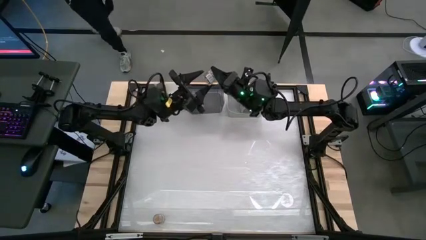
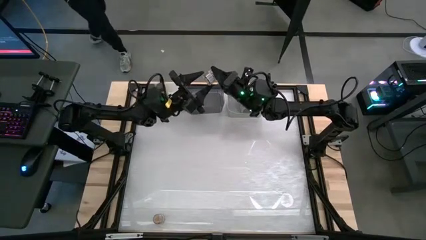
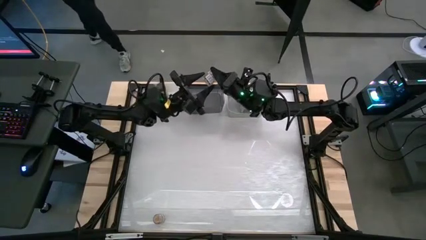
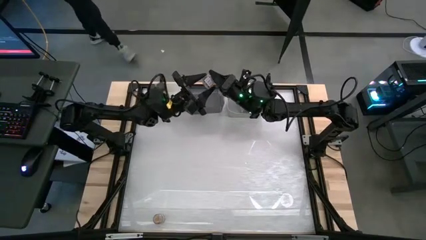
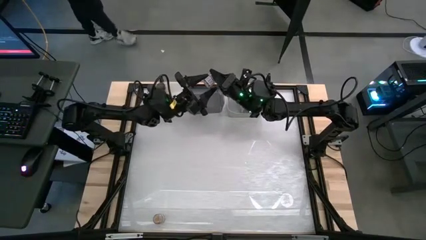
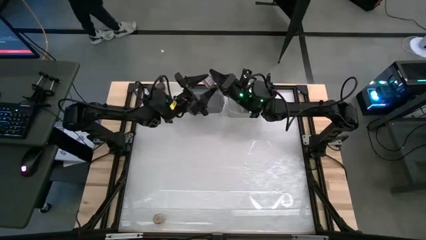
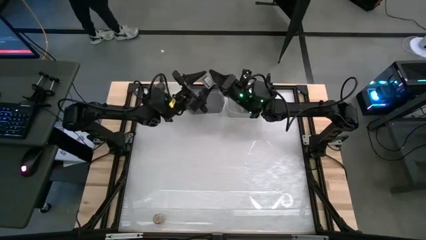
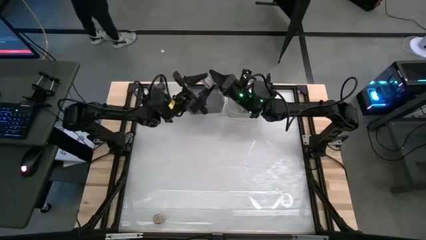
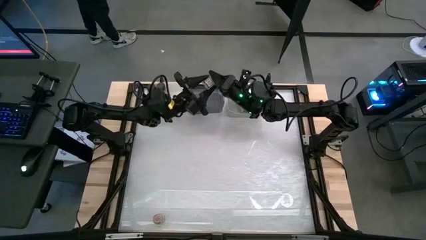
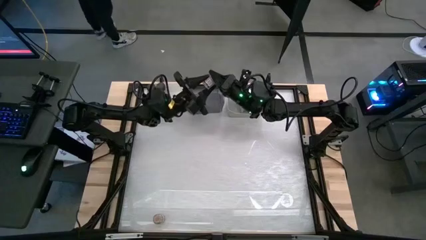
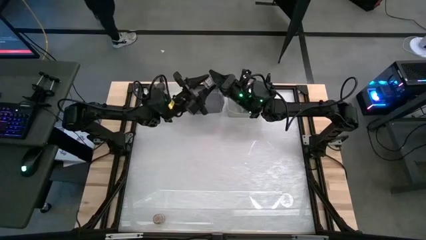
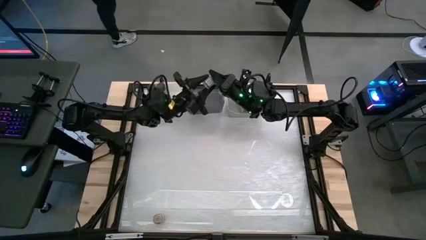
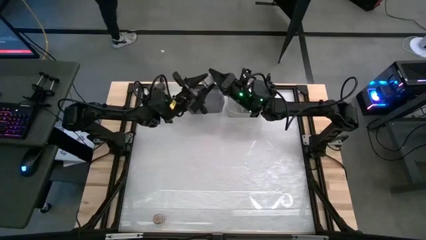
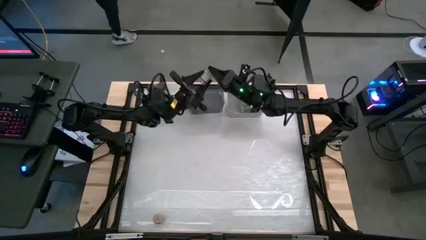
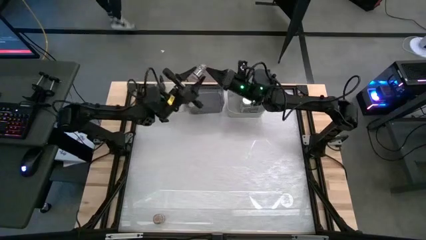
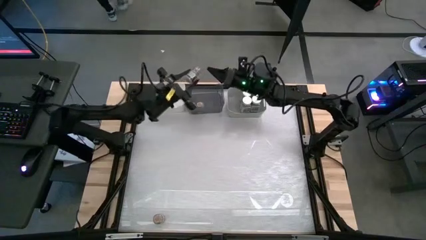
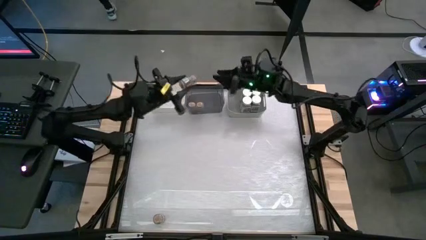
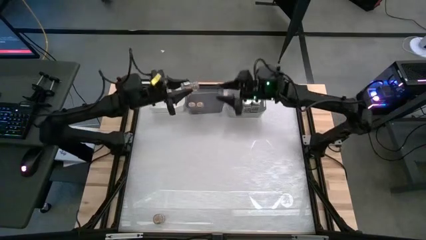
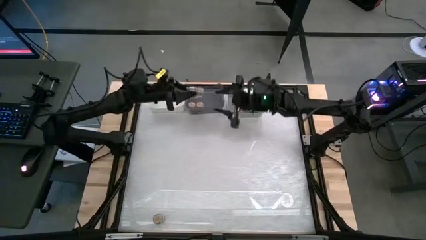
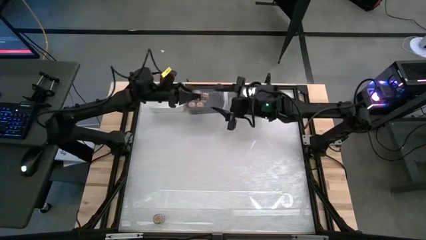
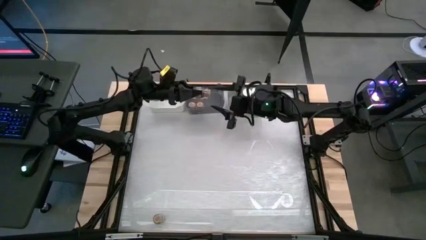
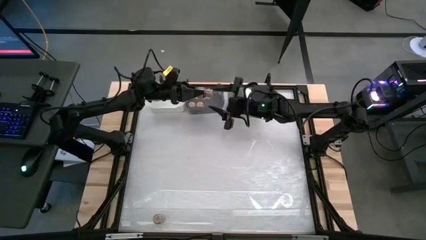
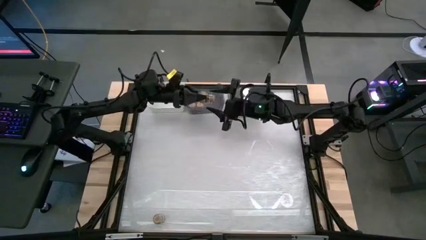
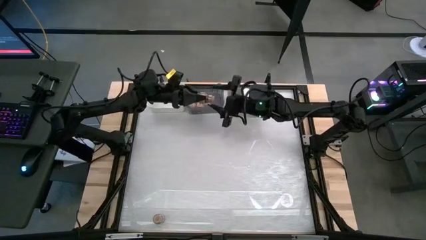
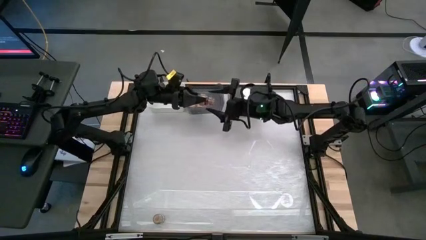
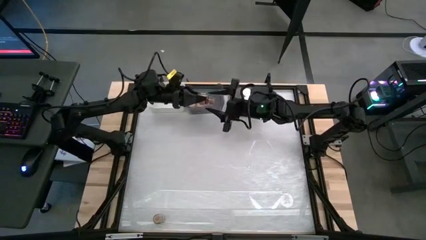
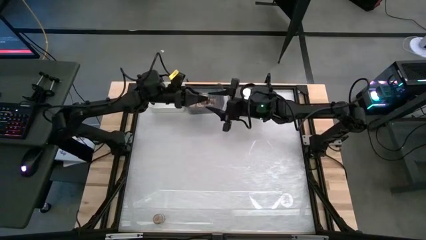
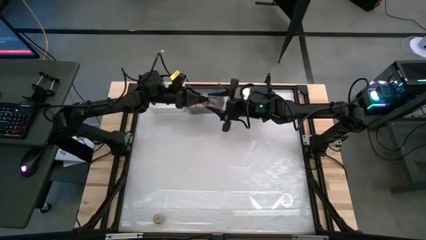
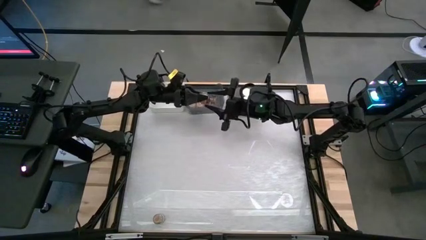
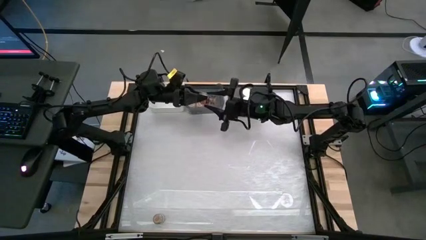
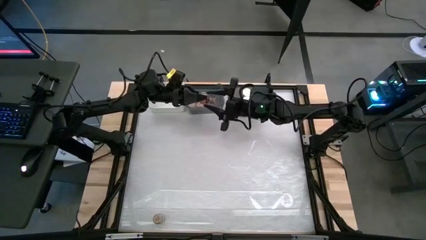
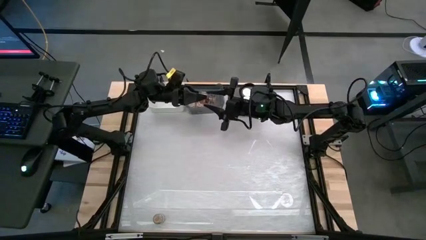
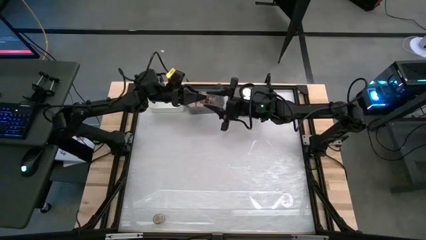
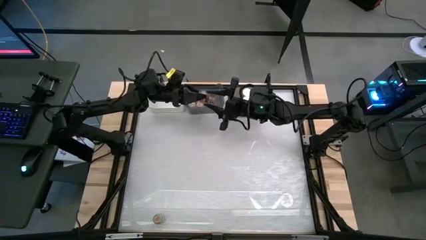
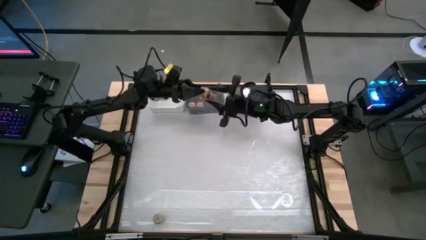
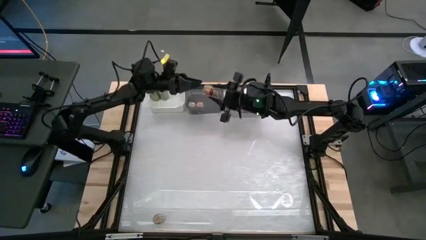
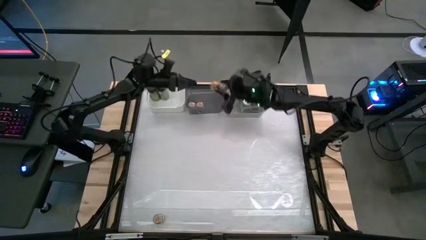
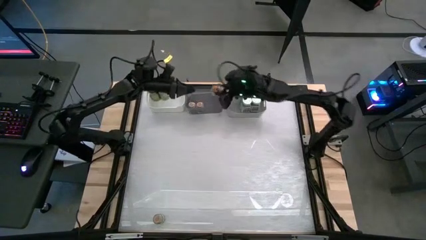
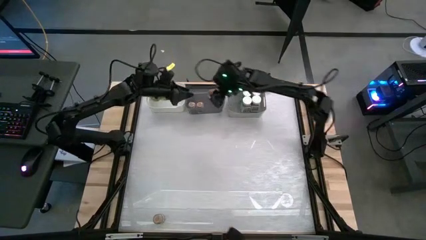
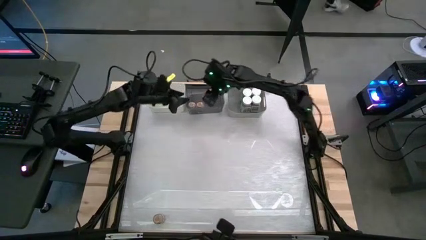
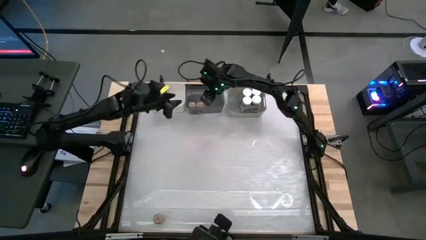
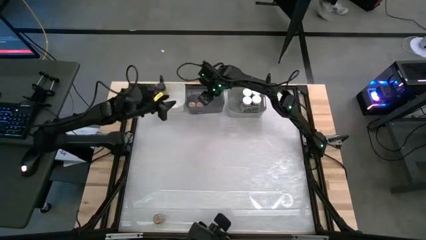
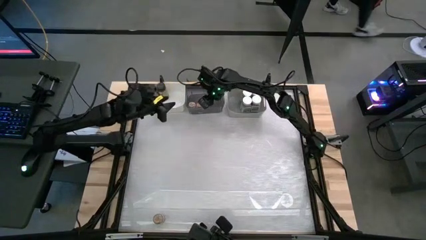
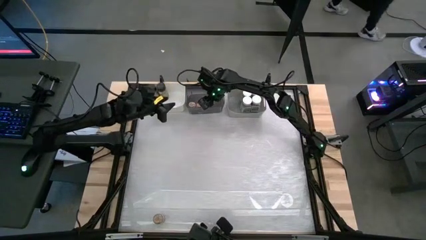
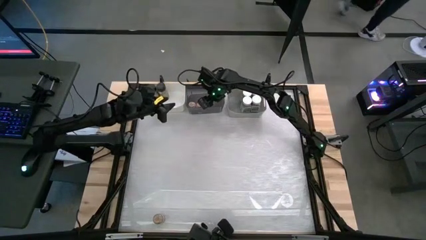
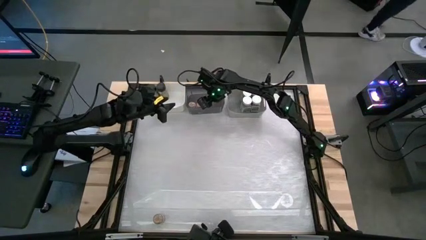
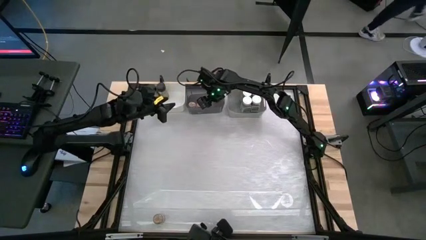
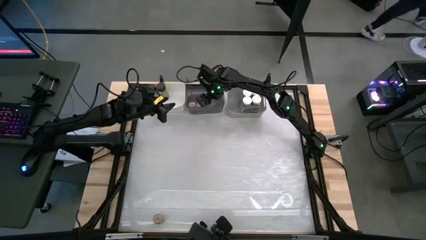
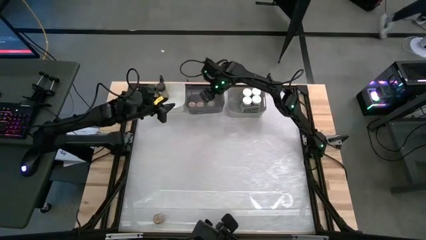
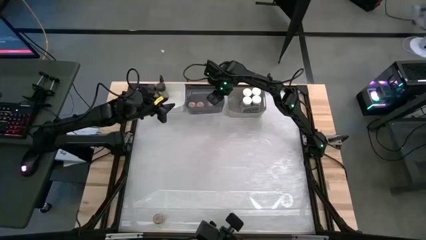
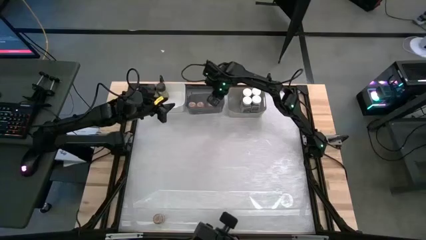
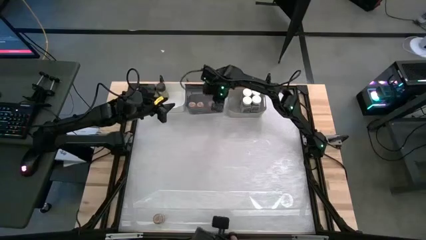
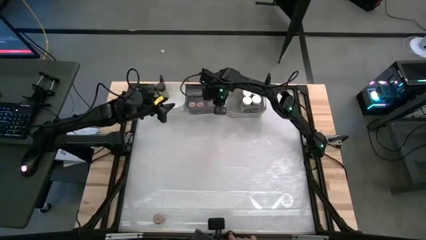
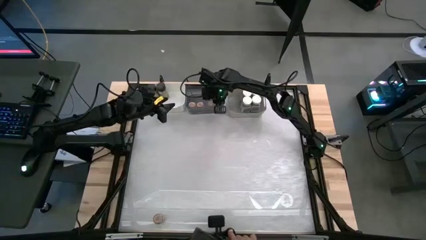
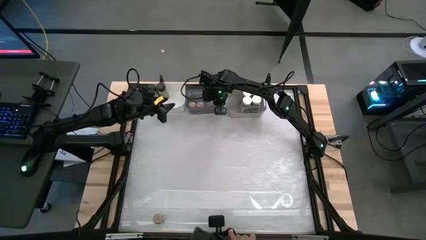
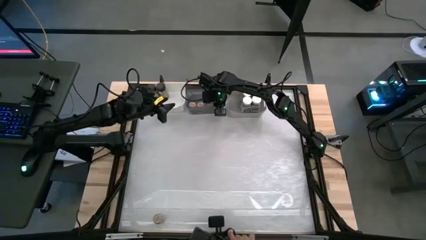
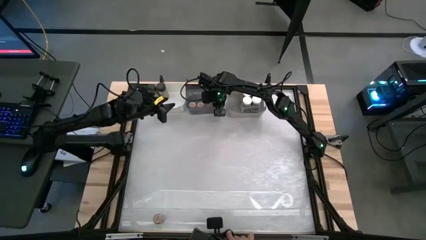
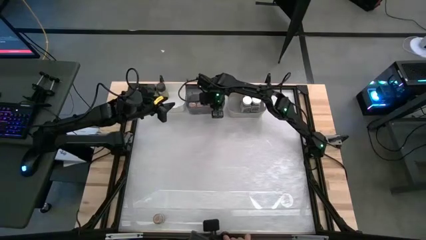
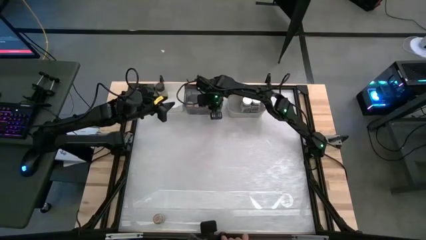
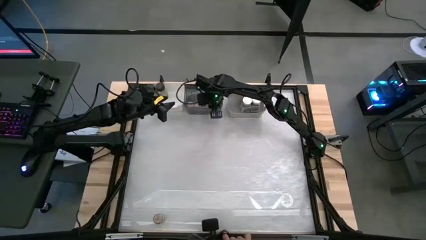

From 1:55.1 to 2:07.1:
Task: Sort spices by type
Put the right brown seasoning bottle into the black bin
